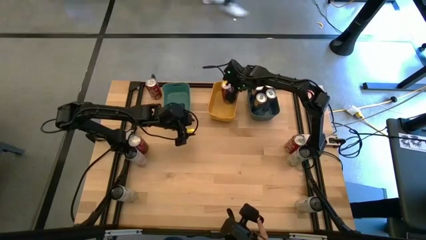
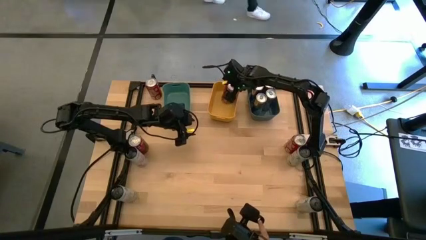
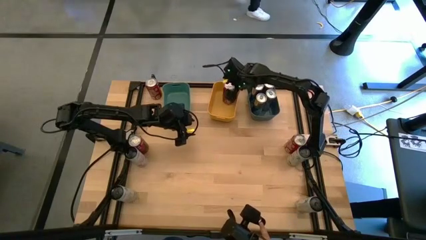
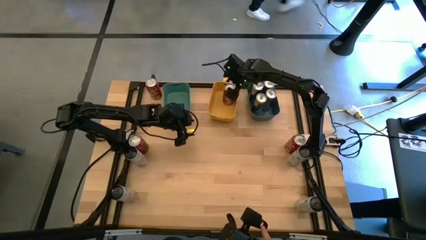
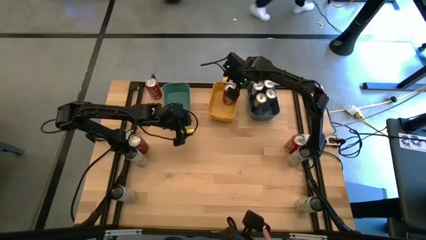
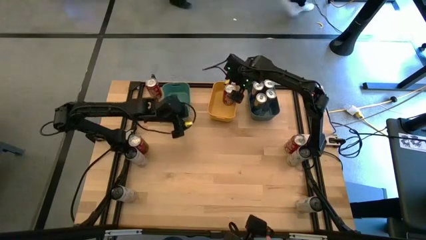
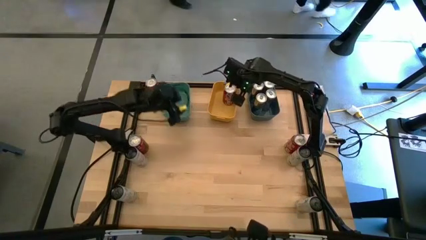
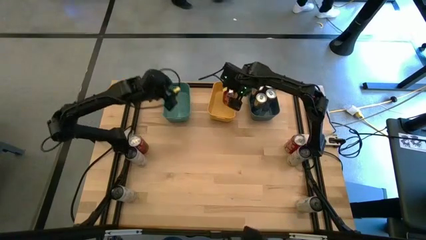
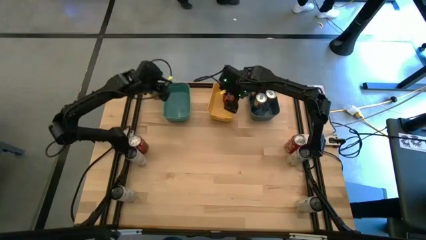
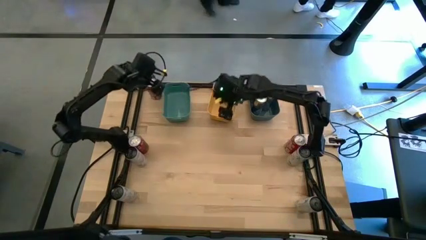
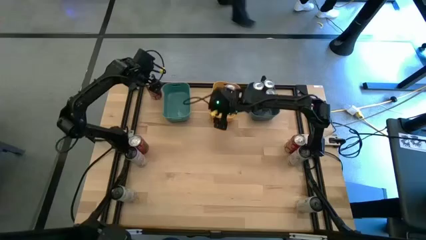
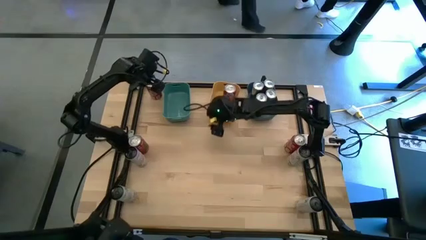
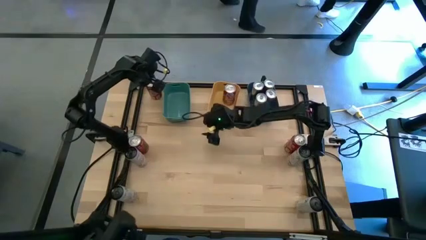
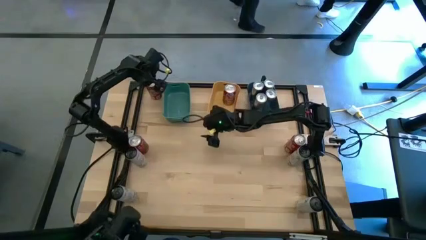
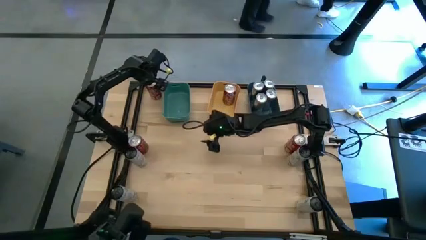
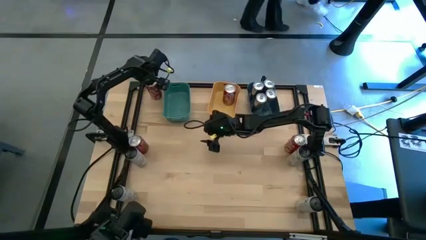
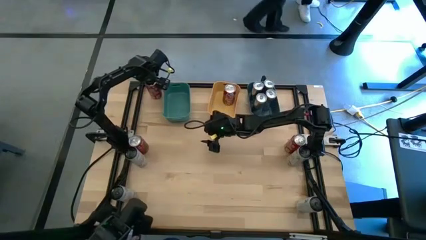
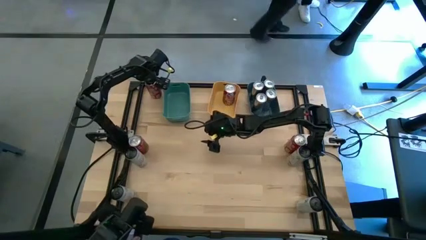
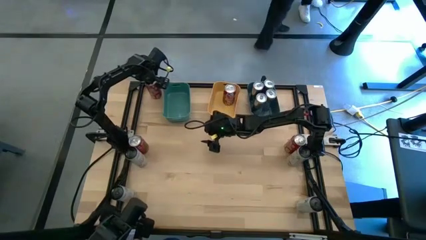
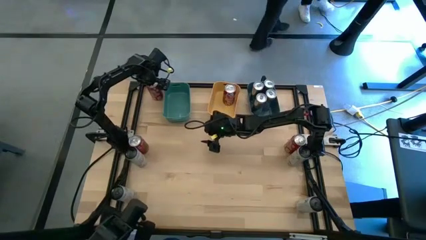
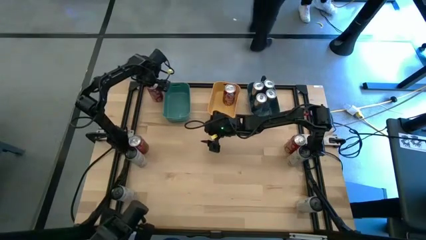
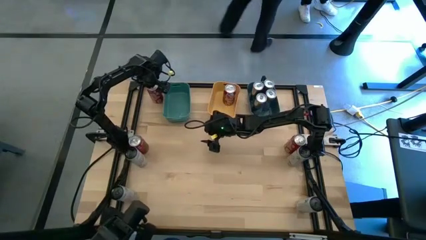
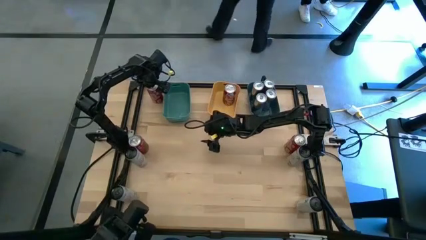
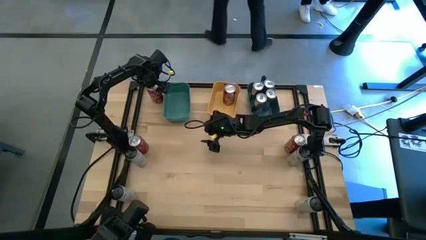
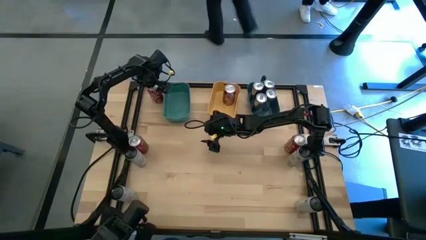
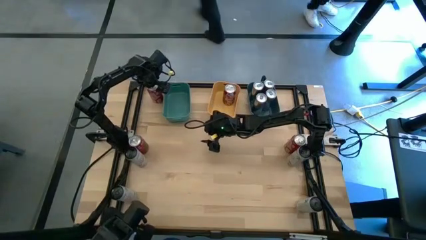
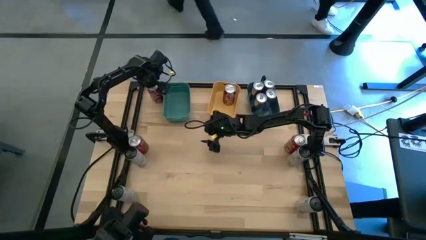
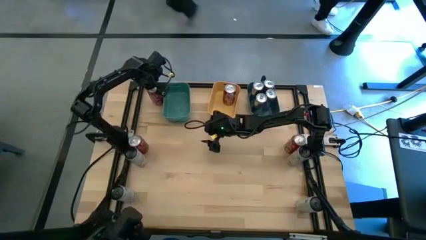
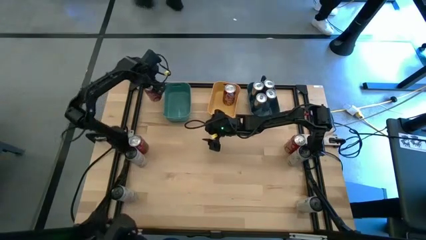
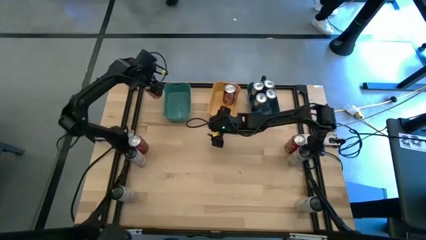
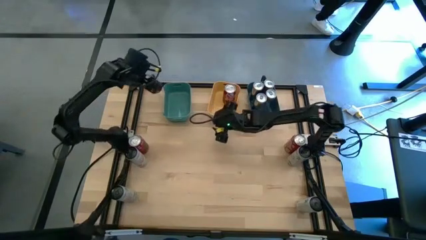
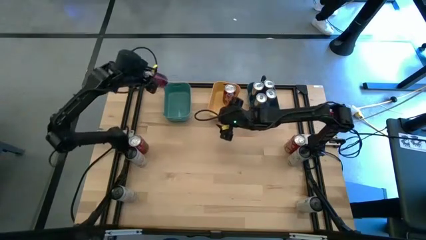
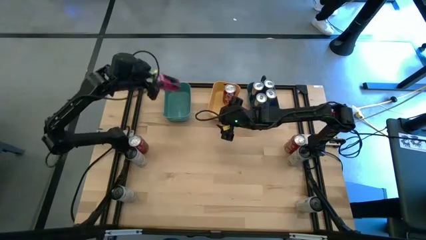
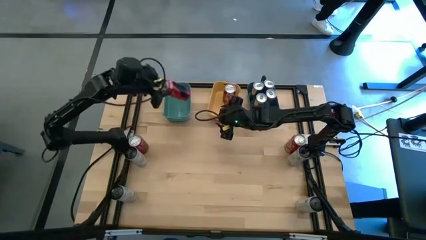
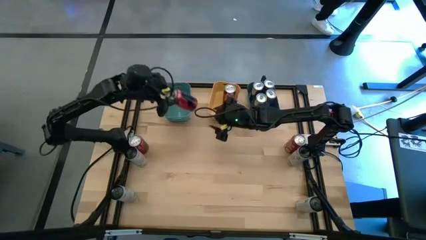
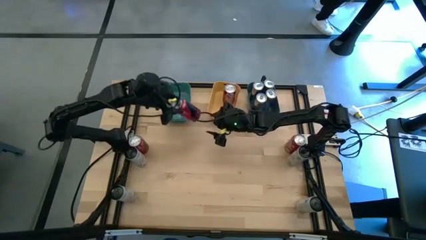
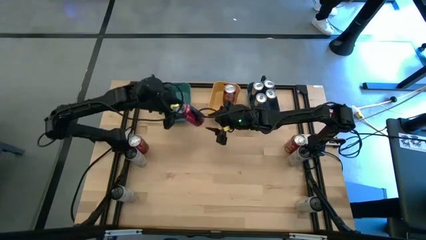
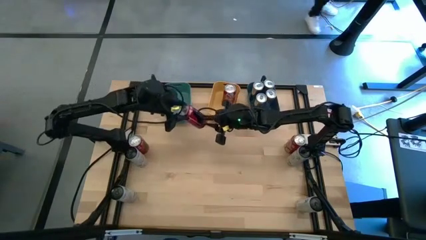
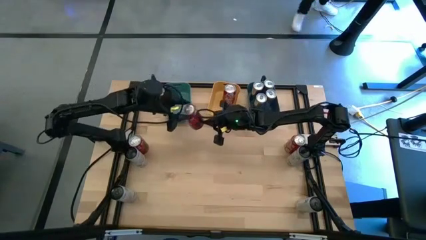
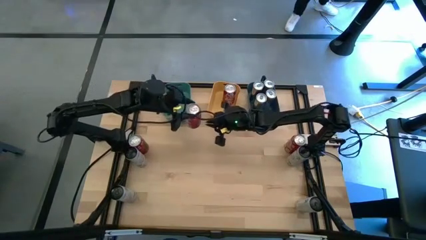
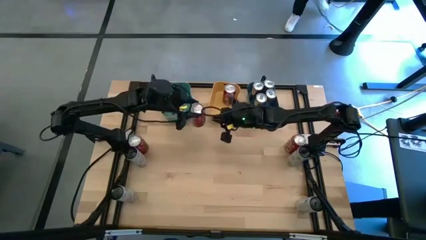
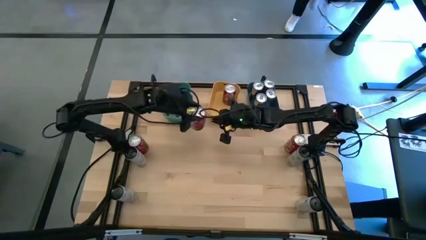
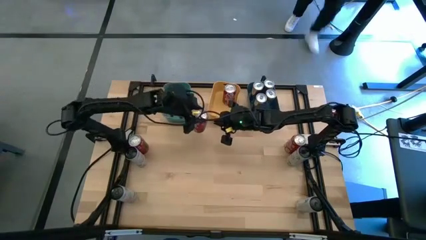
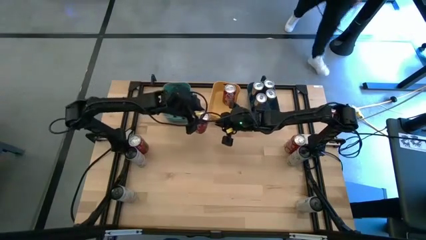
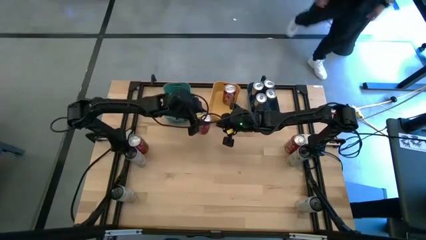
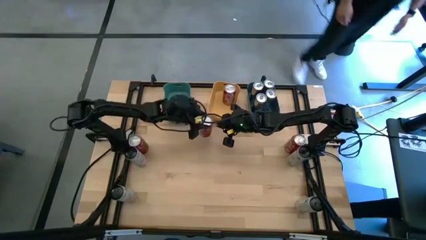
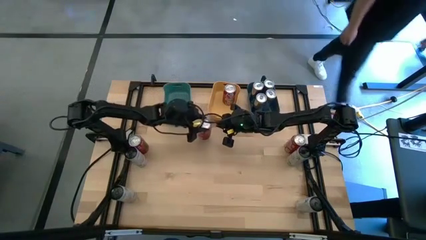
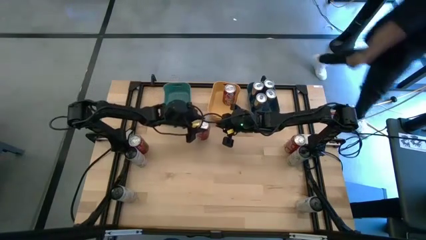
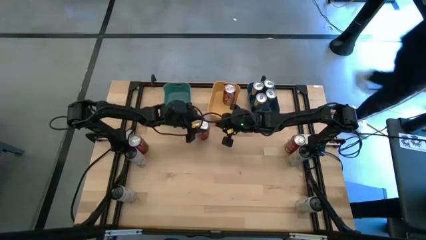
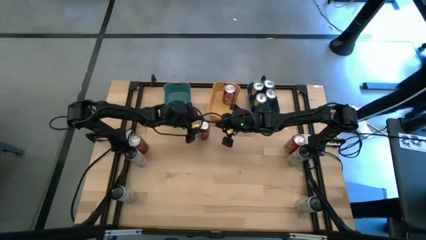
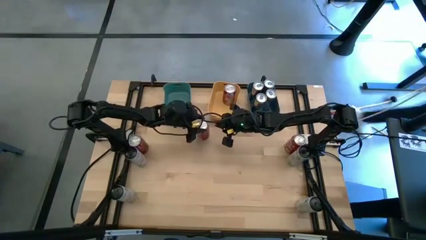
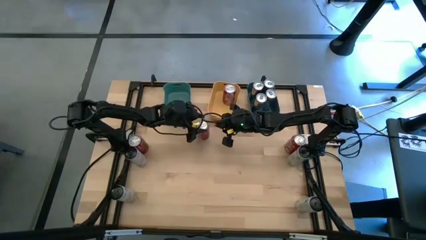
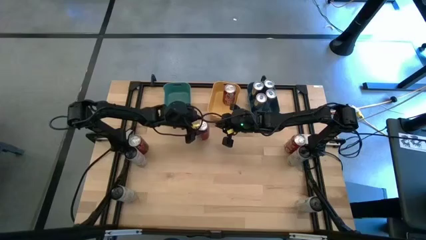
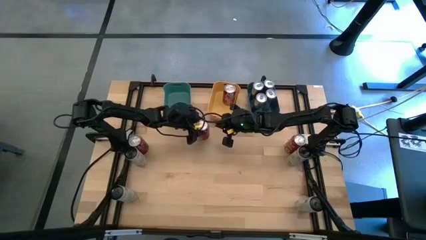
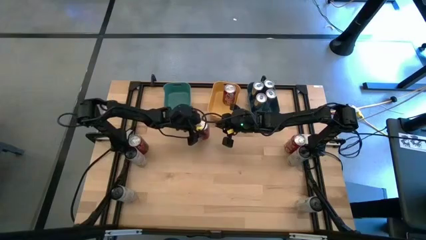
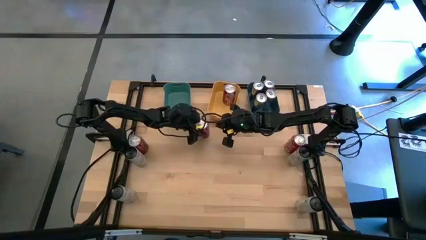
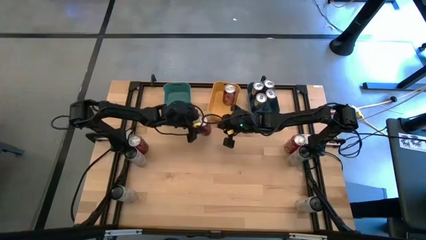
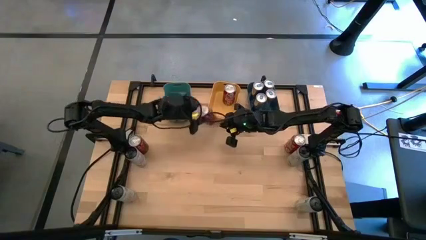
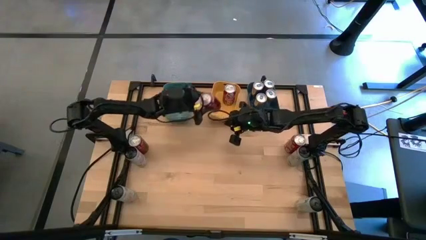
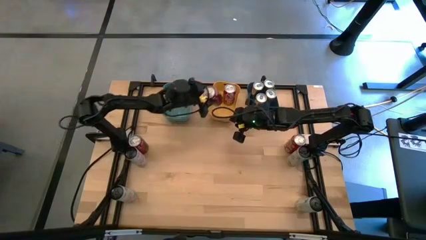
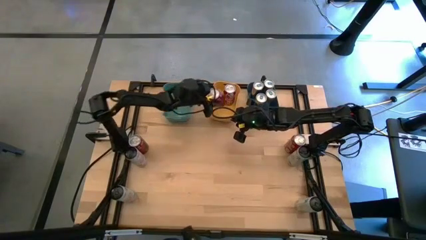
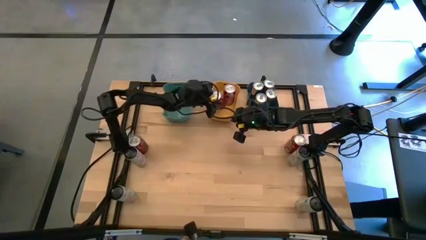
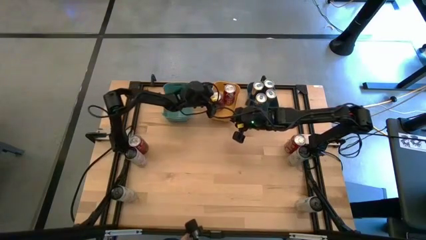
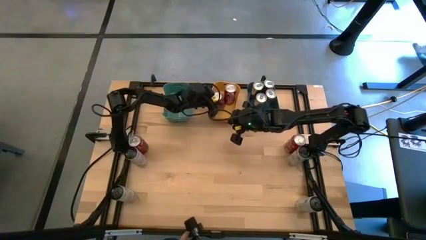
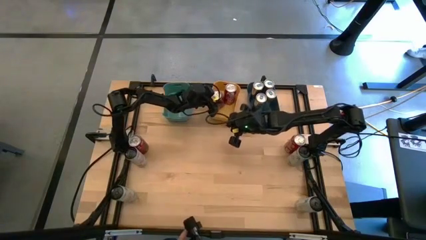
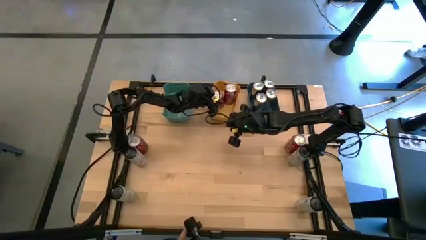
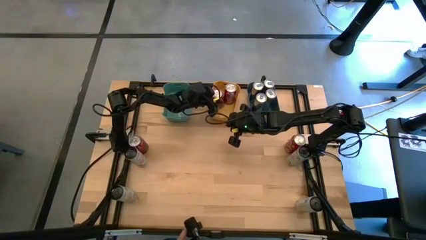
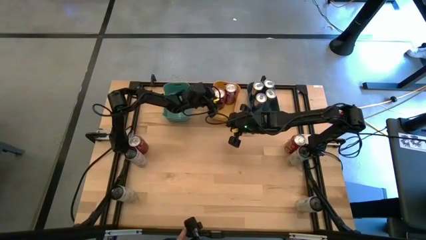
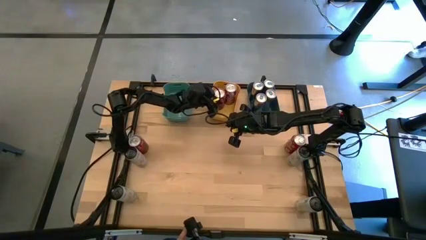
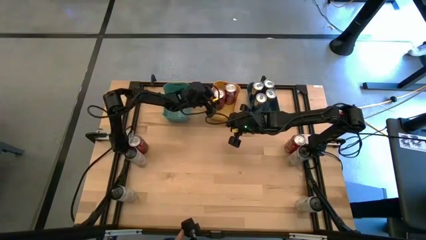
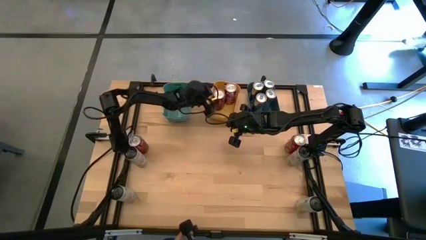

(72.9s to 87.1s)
Task: Sort soda cans
Put the top left red soda can into the yellow bin
